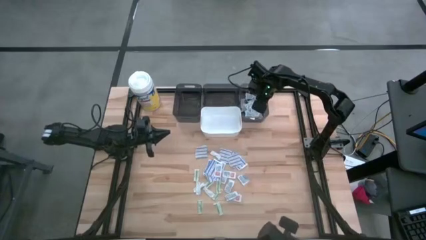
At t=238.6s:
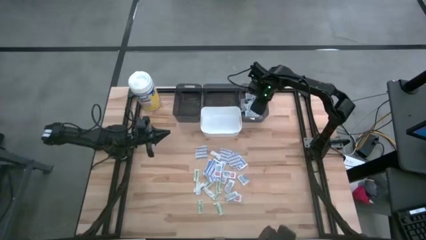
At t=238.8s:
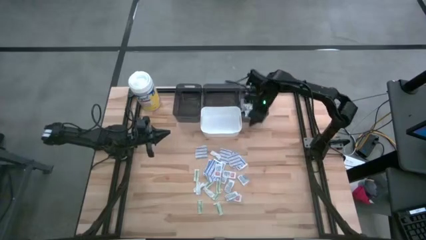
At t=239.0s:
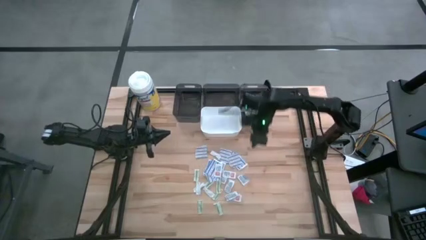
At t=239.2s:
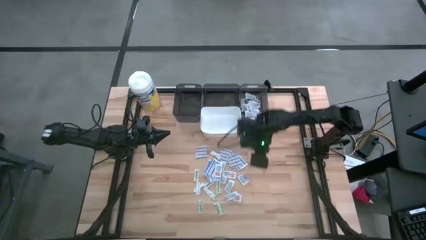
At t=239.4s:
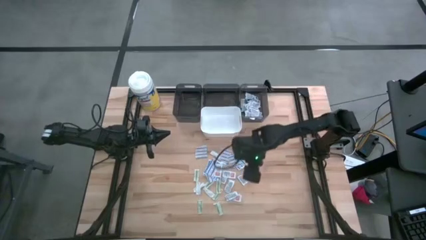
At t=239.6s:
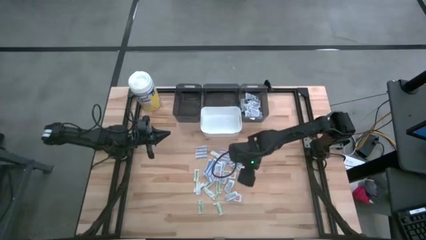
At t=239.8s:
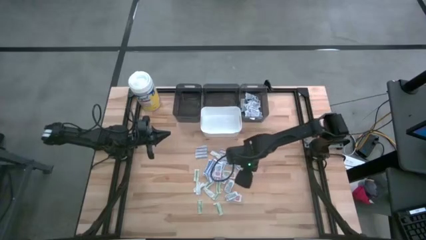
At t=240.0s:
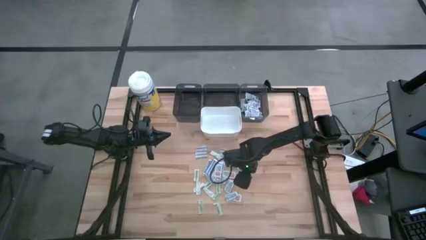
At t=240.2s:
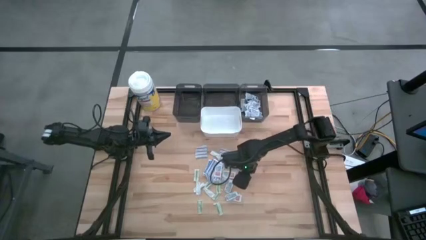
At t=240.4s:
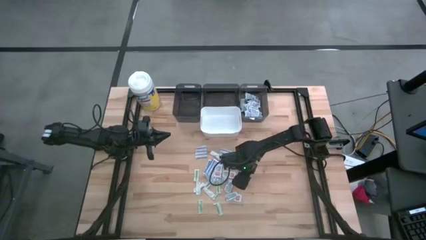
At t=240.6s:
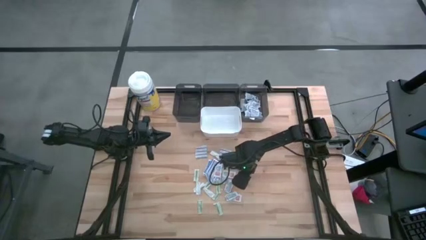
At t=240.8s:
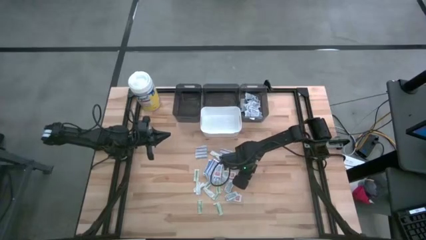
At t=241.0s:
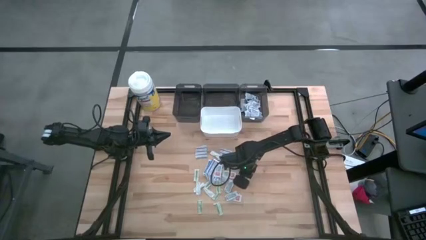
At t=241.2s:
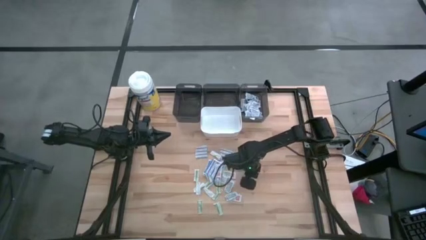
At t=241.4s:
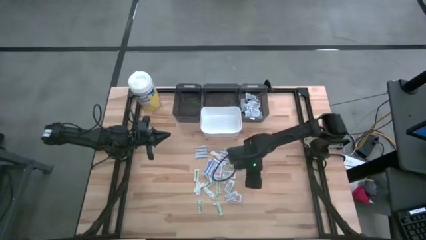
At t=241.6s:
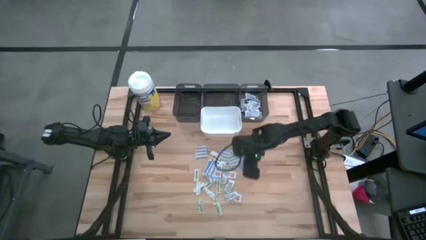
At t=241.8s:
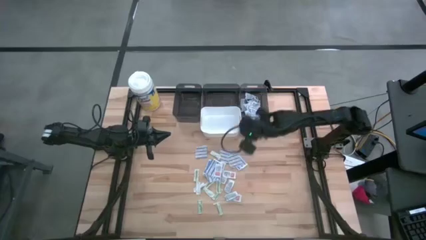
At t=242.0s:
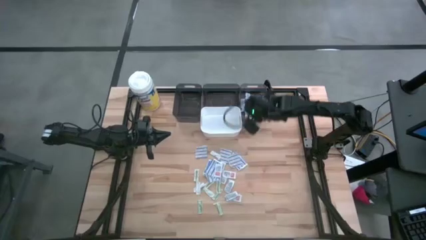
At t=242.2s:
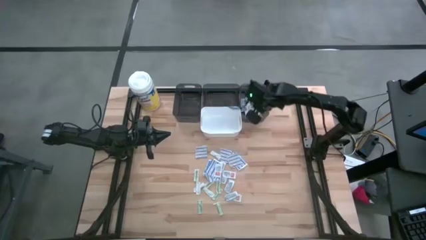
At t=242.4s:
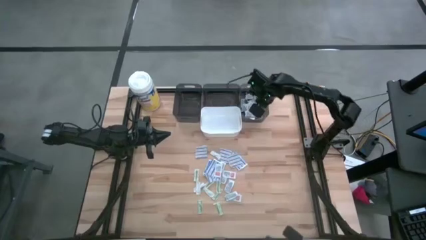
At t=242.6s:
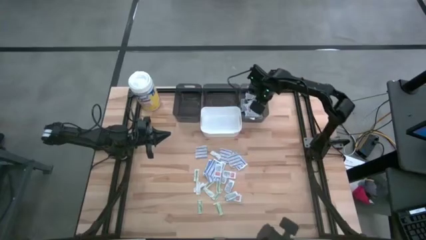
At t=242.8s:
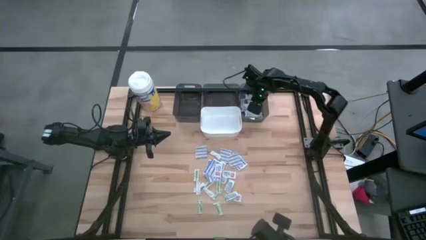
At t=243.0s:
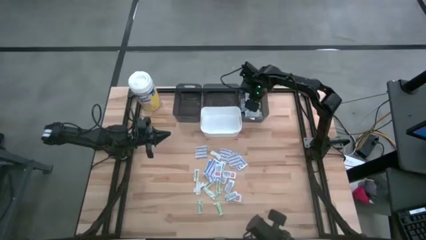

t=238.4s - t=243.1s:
Task: Pick & Place First Aid Supplies
Put the blue alcohol pad into the right black bin

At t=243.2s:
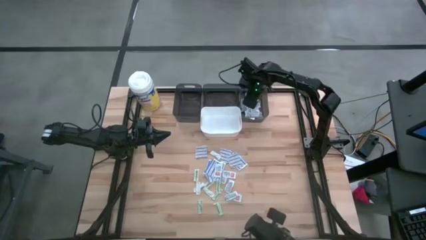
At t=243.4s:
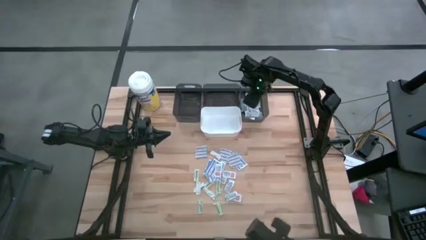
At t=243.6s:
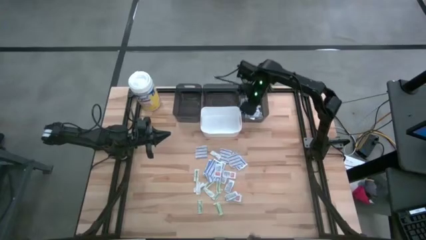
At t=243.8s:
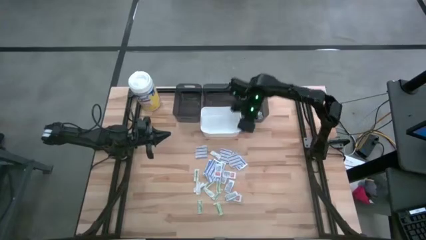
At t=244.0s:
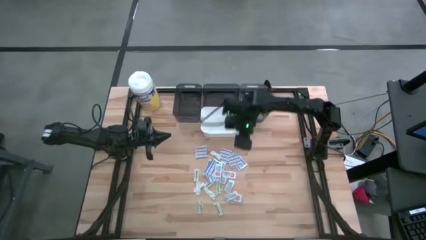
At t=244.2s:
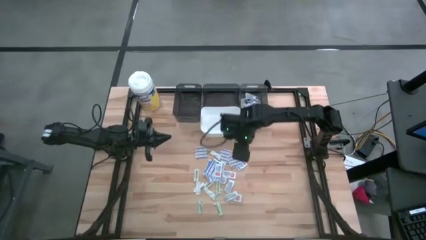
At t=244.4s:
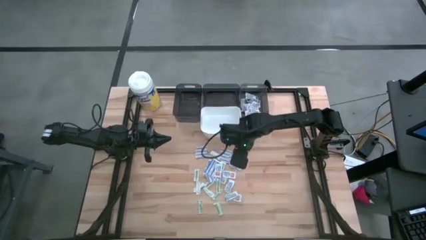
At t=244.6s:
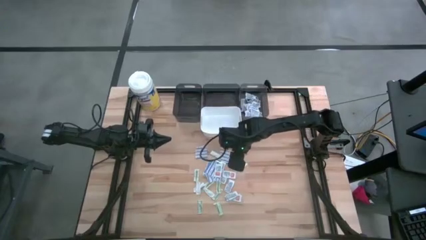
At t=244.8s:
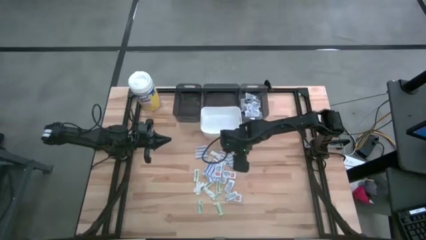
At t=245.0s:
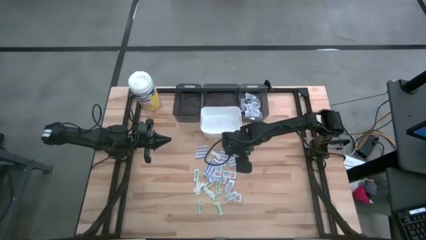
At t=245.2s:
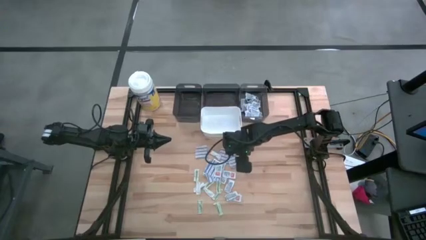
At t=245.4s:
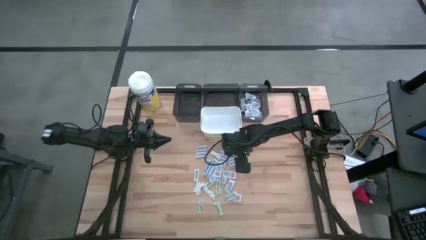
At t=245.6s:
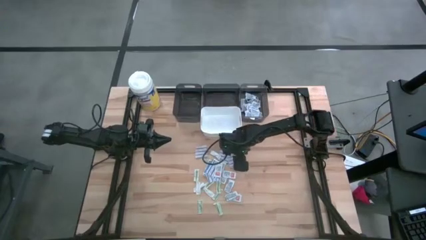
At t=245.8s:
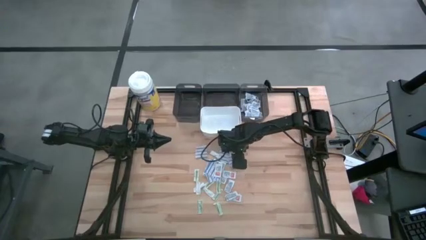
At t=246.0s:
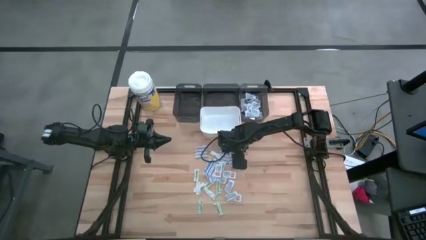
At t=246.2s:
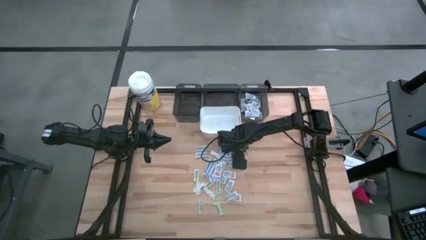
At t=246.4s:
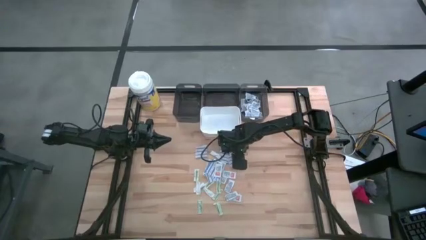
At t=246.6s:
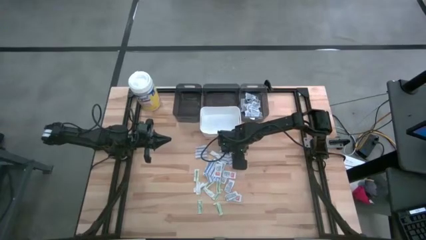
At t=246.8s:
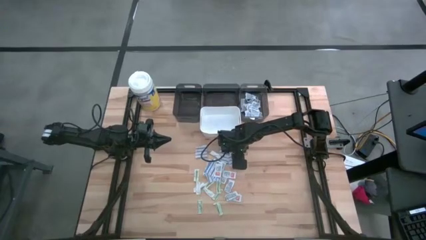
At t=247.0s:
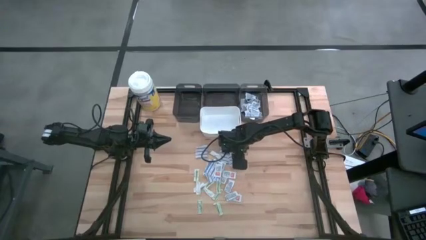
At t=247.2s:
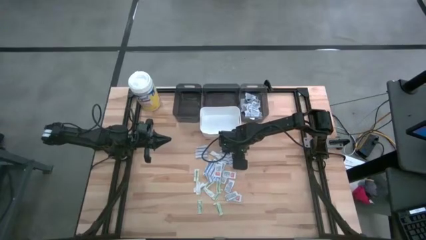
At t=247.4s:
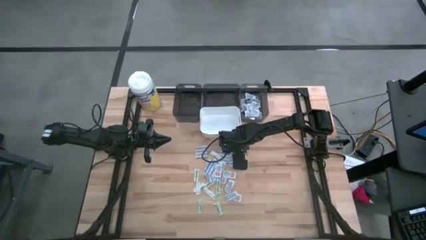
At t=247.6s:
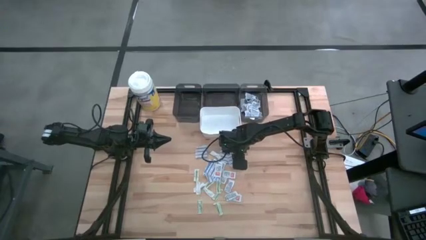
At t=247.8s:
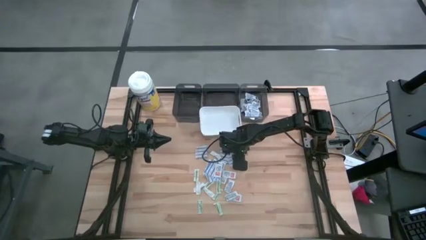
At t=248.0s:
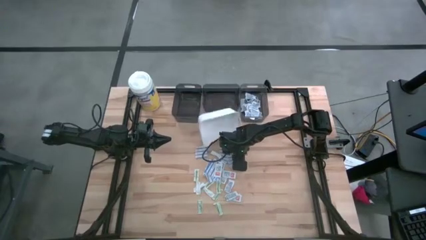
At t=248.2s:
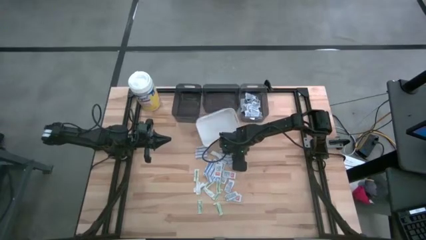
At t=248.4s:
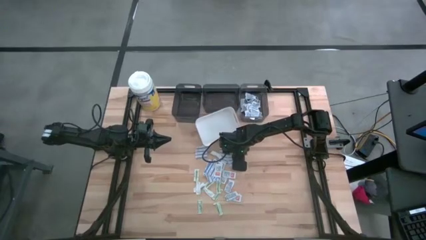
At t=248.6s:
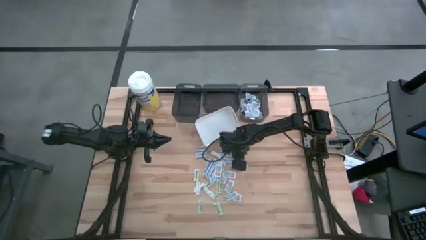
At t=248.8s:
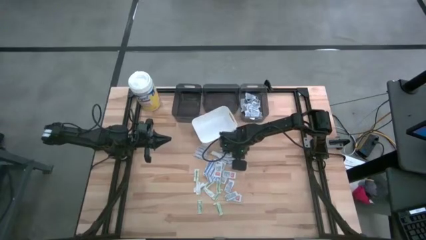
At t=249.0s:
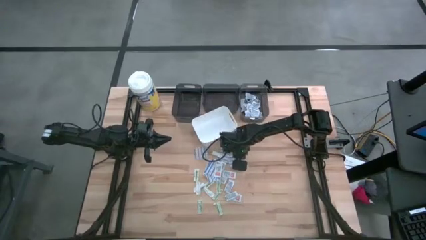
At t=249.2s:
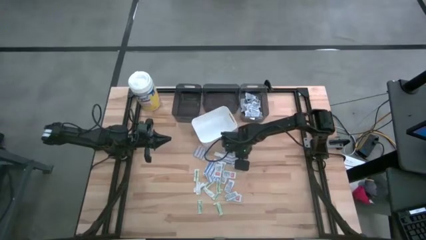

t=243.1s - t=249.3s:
Put the blue bandage pack into the middle black bin

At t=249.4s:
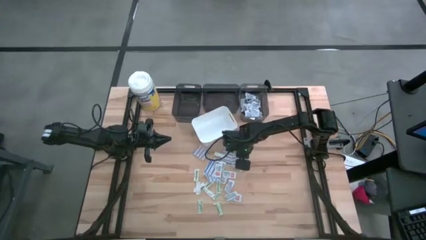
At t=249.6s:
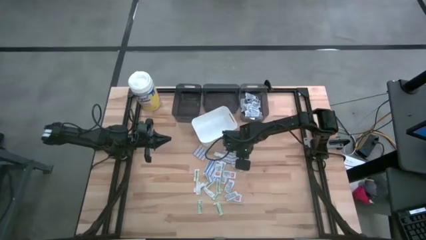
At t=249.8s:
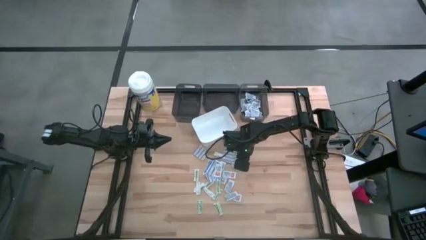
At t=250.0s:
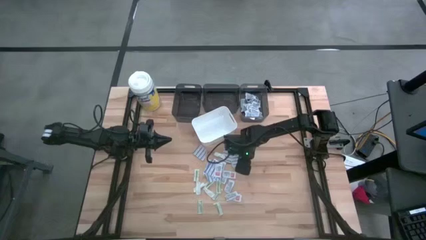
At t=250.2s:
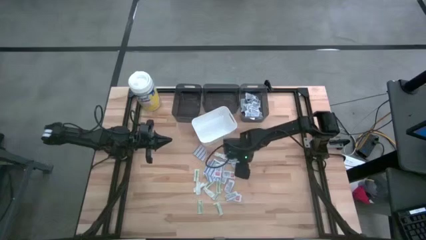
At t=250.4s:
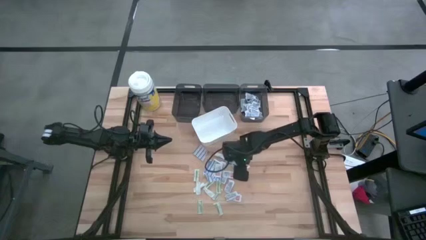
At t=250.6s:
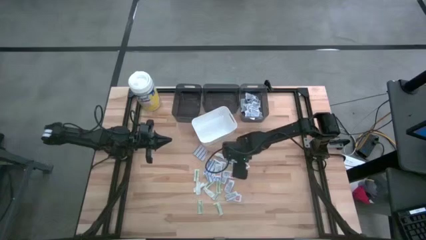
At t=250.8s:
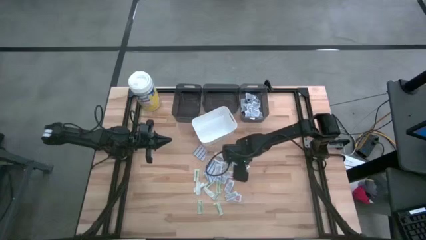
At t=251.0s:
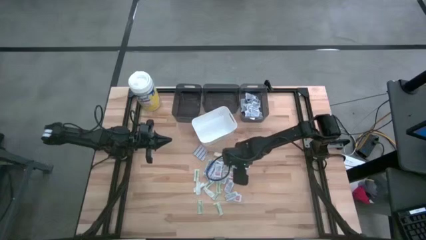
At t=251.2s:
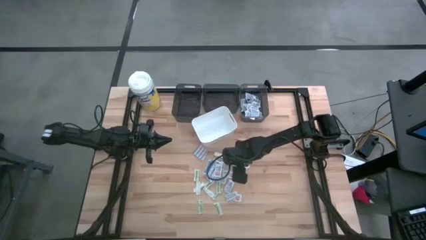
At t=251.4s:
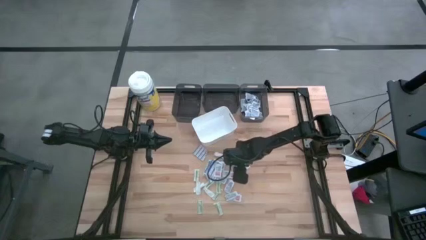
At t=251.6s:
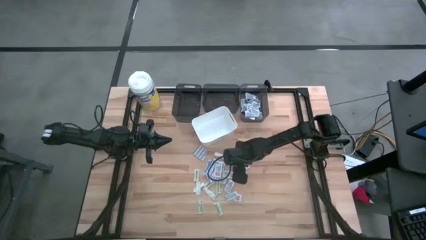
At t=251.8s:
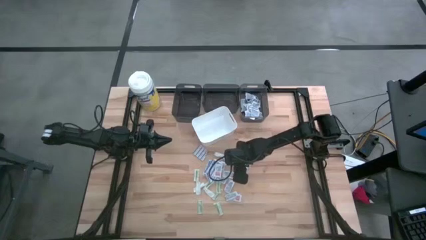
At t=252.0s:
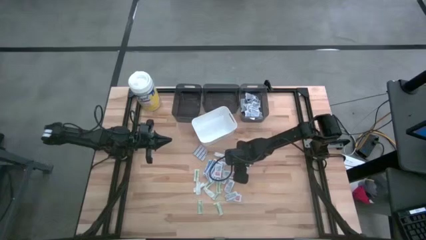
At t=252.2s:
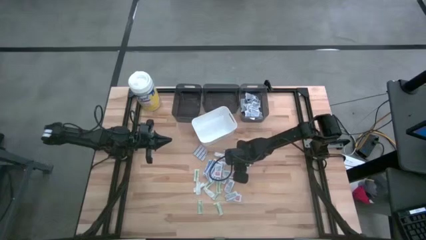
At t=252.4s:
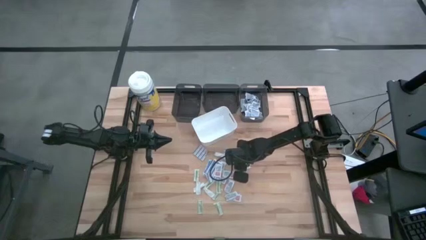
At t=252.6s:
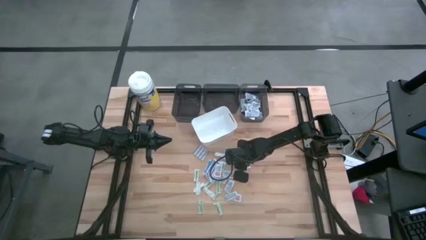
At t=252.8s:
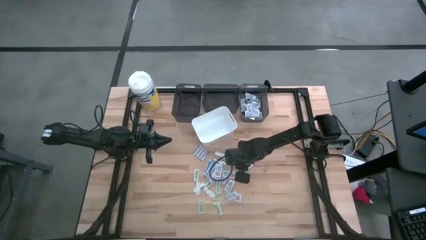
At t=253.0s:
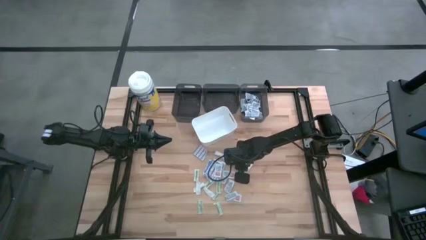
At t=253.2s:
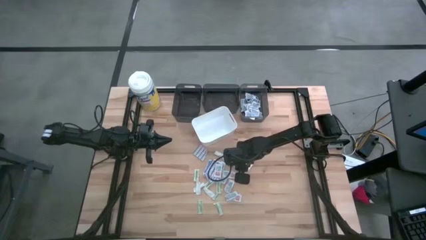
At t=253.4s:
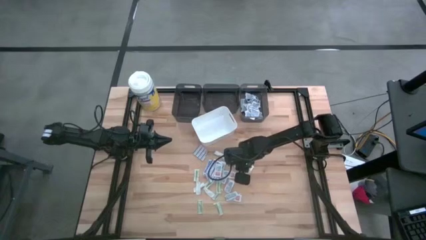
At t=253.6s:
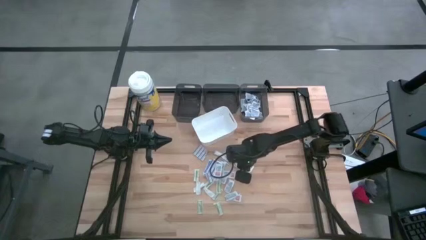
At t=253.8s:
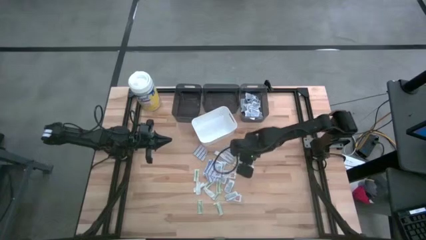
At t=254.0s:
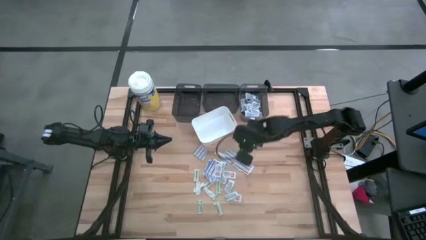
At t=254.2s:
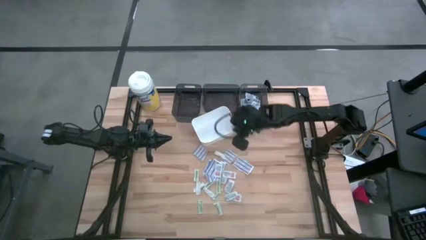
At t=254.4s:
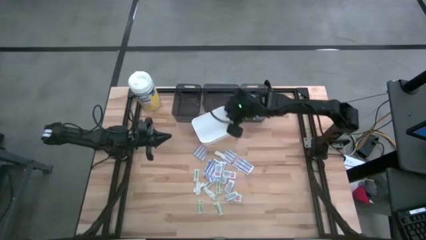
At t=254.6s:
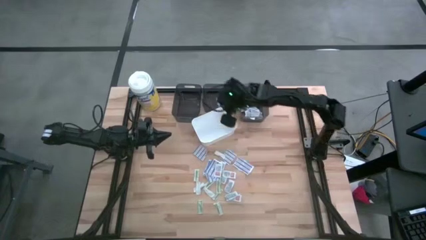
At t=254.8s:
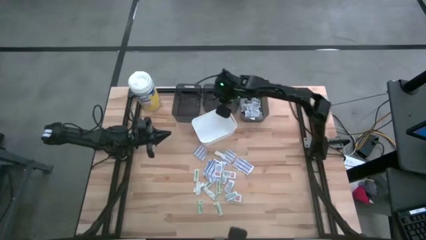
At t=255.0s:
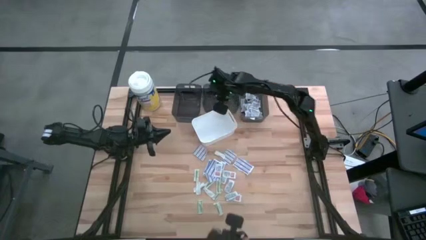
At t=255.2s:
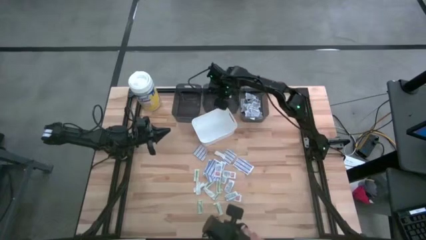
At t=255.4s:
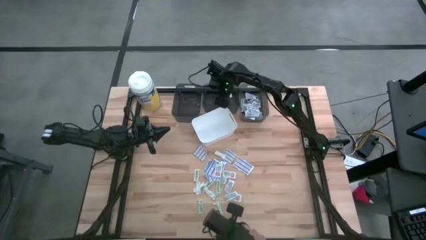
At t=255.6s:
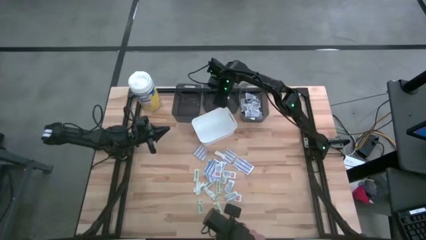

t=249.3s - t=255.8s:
Put the blue bandage pack into the middle black bin
